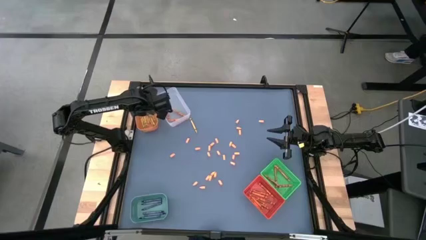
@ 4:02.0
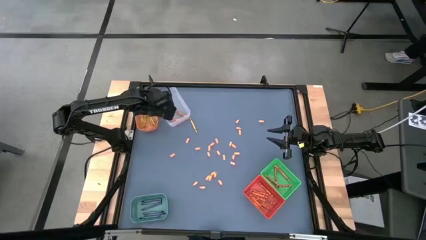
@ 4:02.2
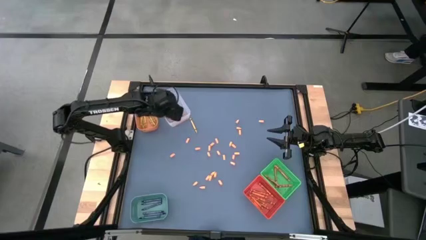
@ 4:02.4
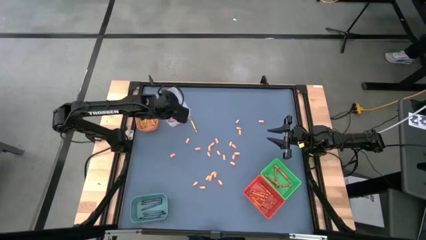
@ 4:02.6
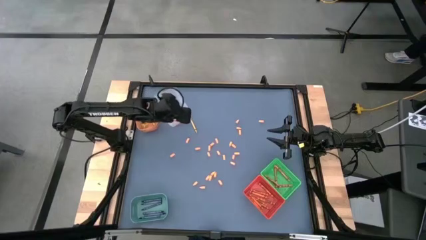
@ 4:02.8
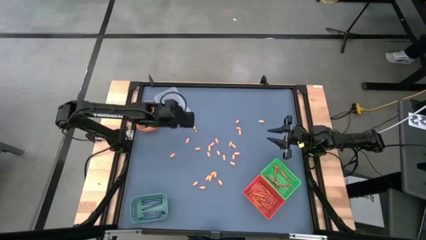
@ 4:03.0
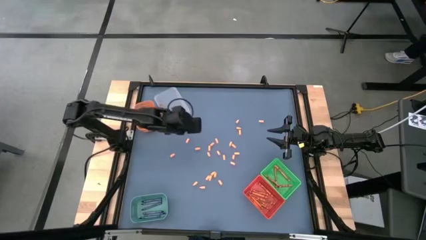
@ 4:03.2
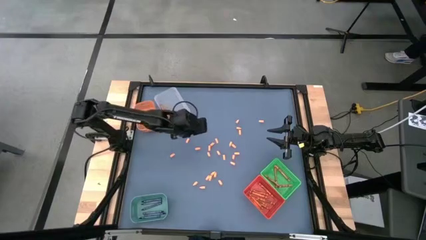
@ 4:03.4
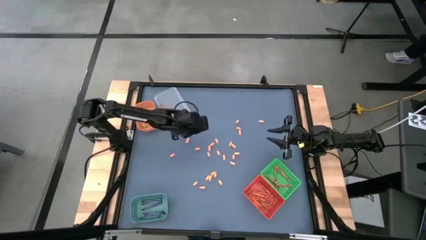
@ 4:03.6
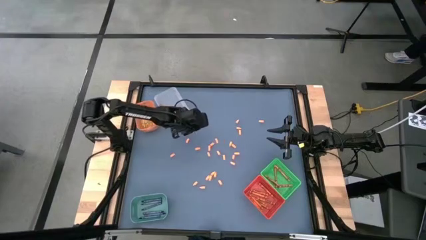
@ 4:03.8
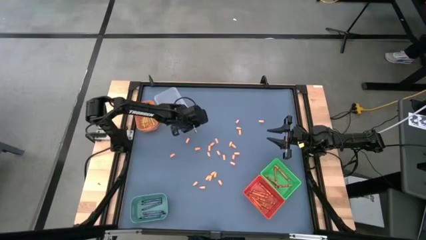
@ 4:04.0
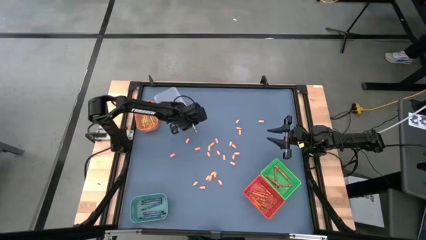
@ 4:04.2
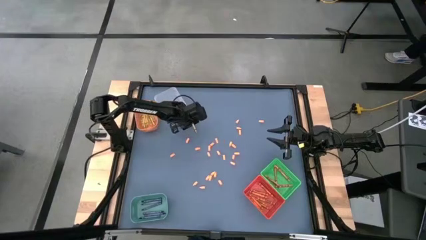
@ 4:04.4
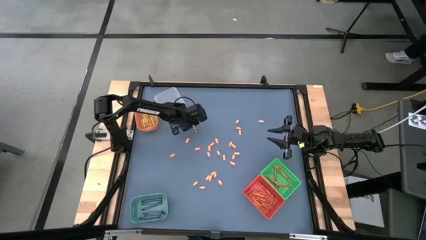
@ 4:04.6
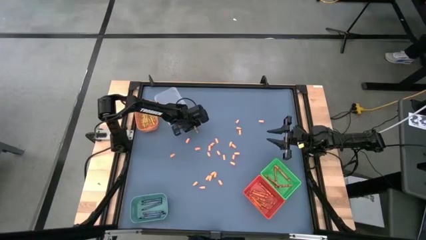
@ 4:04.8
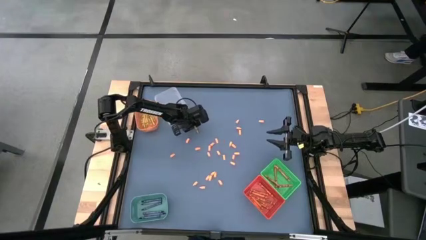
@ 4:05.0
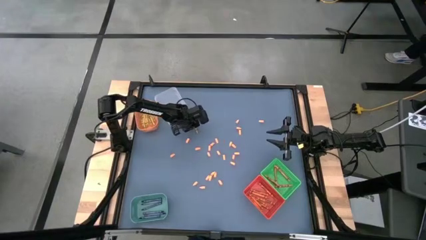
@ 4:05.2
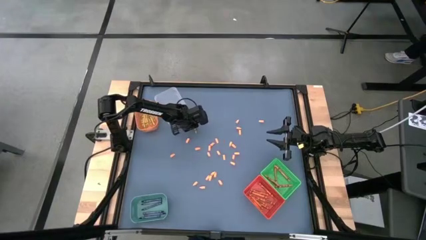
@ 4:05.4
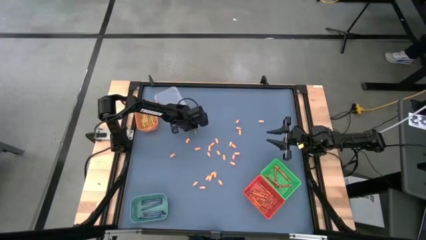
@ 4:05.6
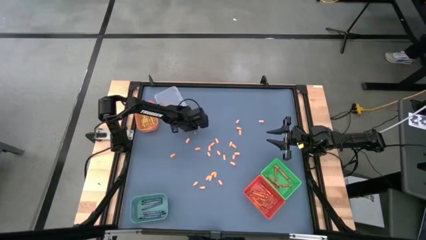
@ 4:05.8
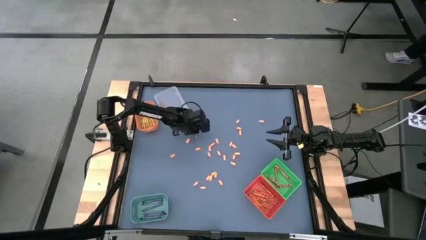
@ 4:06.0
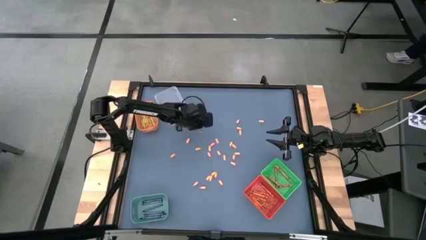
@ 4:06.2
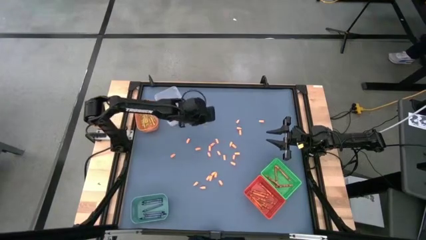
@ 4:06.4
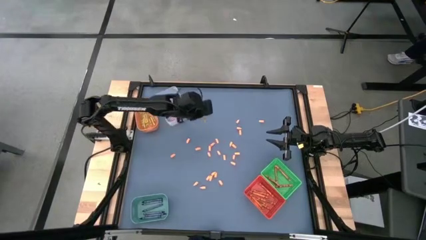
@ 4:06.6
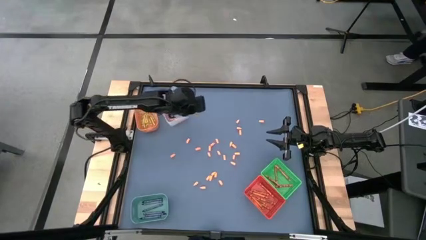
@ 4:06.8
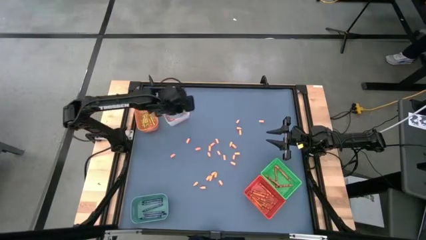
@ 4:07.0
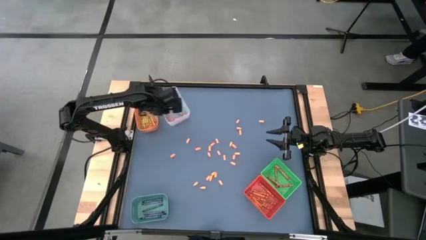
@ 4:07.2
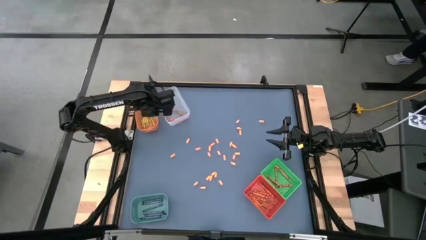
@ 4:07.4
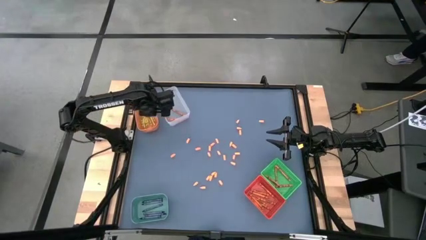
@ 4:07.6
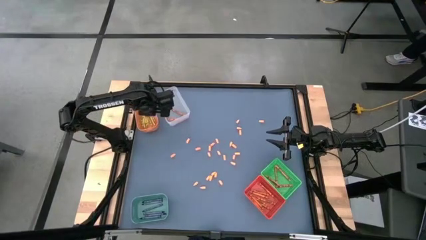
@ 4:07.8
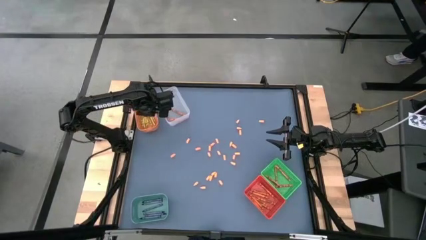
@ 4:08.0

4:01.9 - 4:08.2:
Task: Sort crayons
Put the yellow crayon into the orange bin

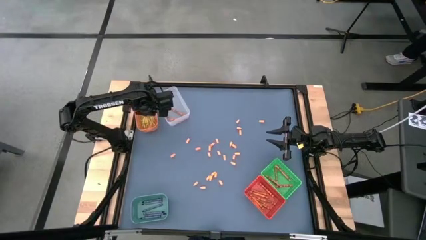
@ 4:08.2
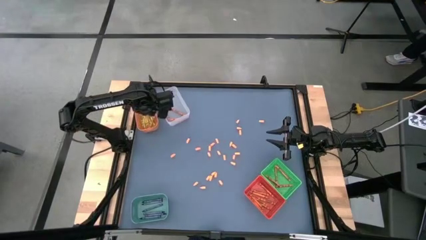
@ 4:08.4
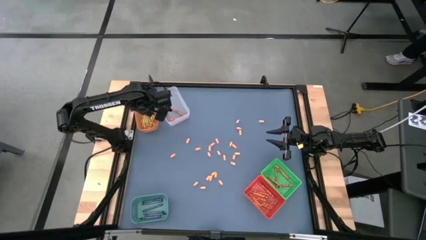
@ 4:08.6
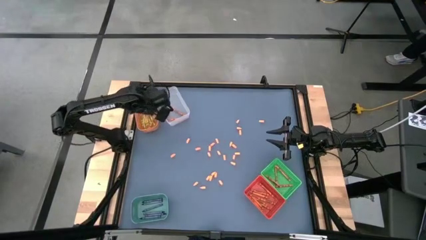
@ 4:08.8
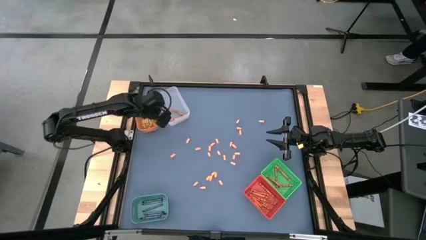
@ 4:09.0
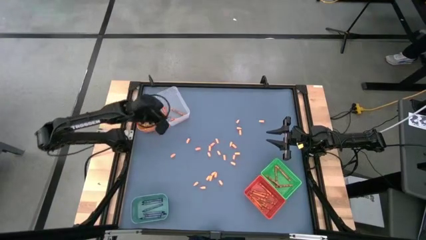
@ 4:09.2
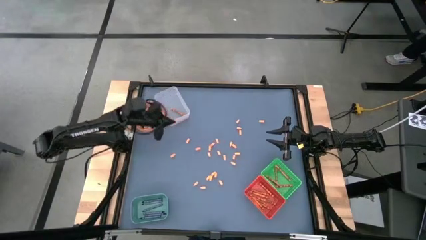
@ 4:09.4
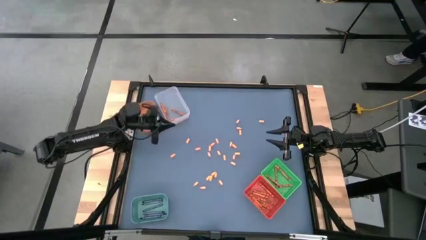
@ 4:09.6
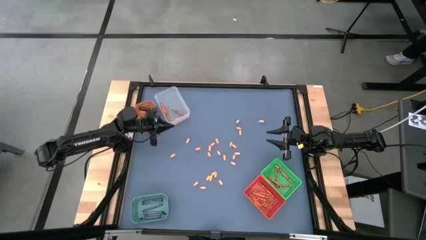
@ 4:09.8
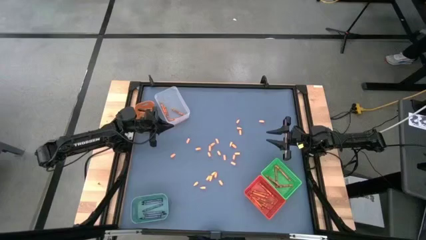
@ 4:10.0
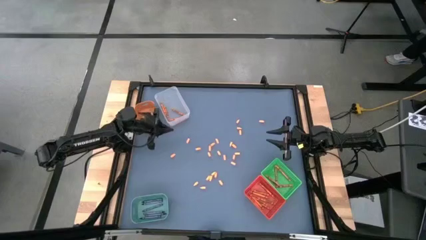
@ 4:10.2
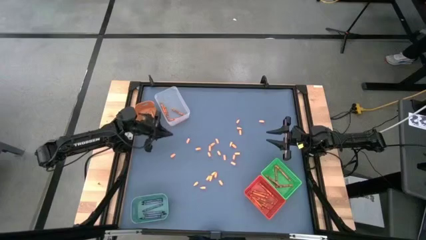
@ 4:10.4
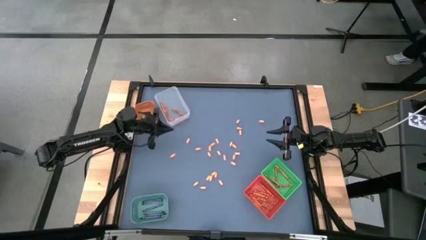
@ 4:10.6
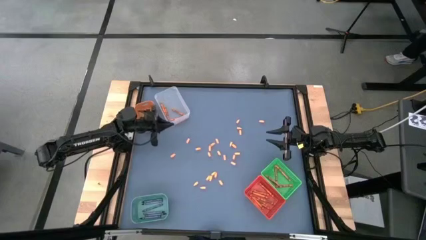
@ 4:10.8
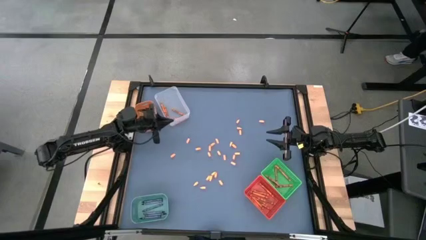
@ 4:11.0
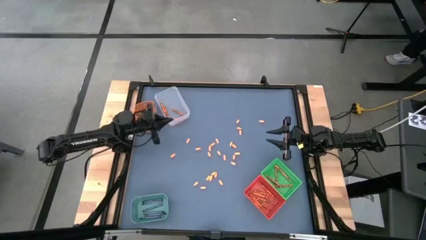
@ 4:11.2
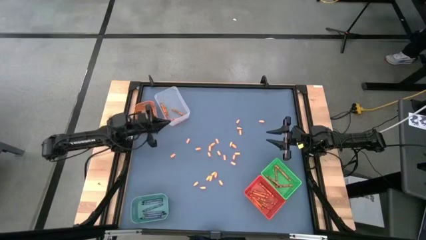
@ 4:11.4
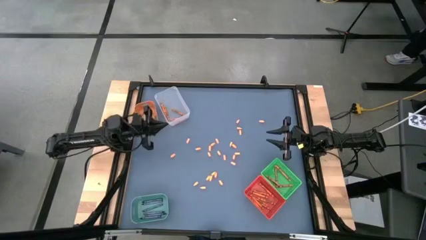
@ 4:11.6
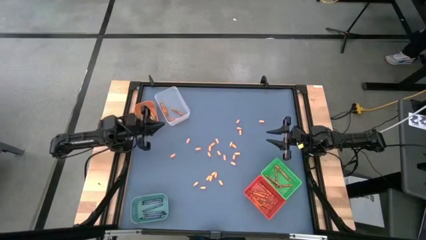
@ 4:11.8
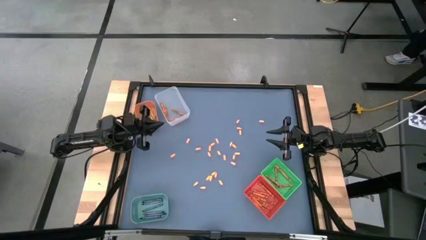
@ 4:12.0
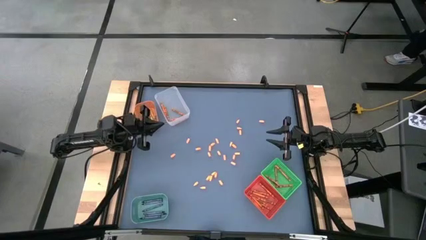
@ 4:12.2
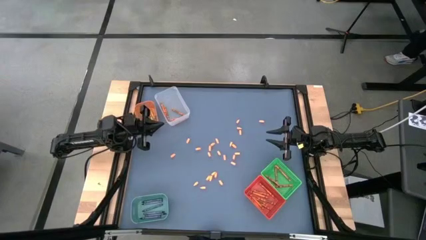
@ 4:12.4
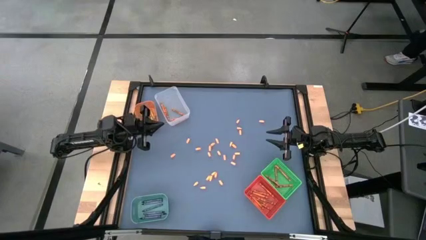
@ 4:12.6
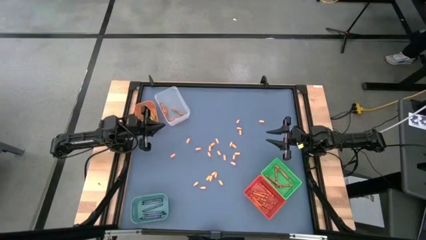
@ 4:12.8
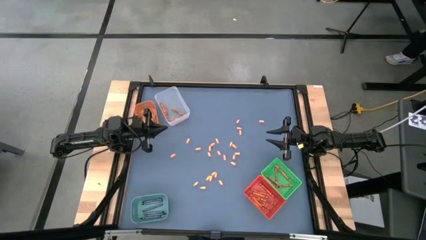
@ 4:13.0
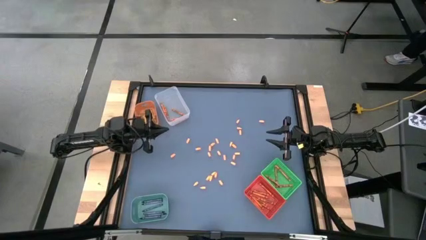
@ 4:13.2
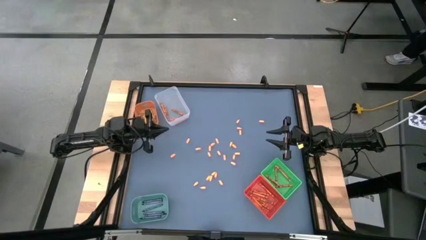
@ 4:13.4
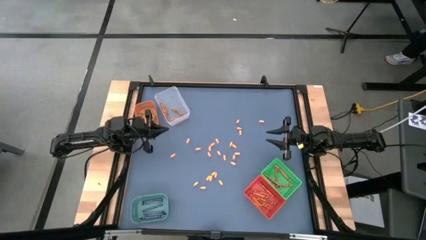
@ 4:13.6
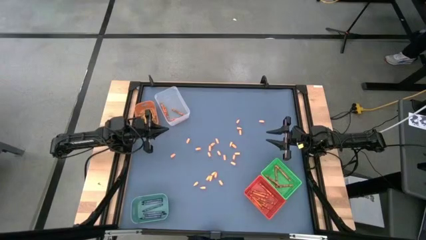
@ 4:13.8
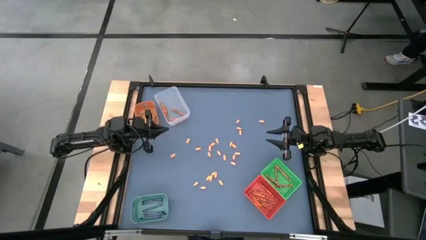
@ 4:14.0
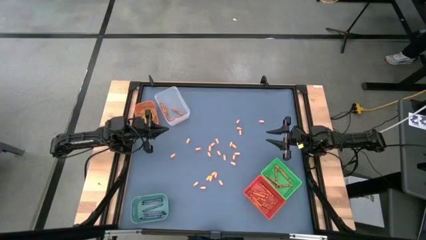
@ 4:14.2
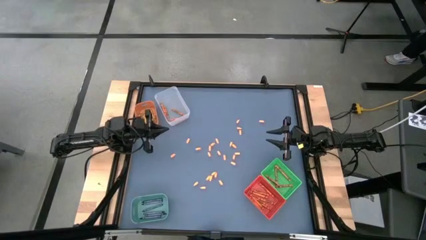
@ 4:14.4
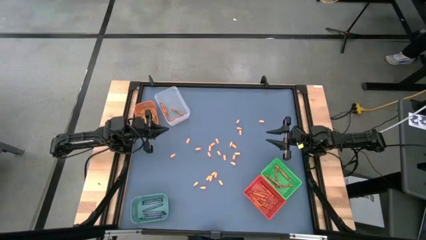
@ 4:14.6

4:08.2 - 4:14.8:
Return to Home Position
